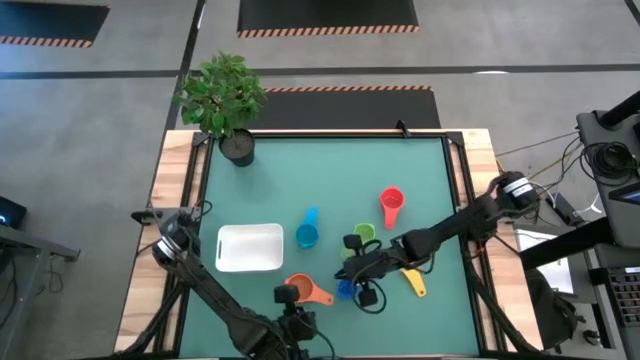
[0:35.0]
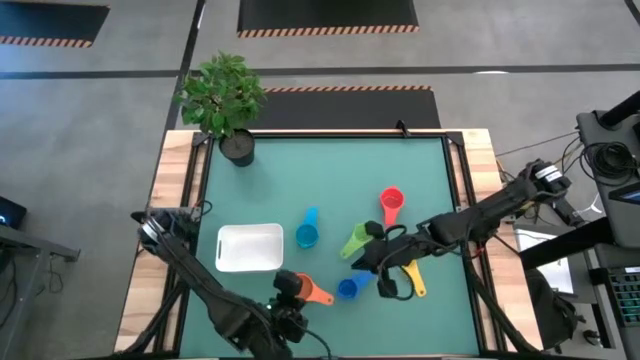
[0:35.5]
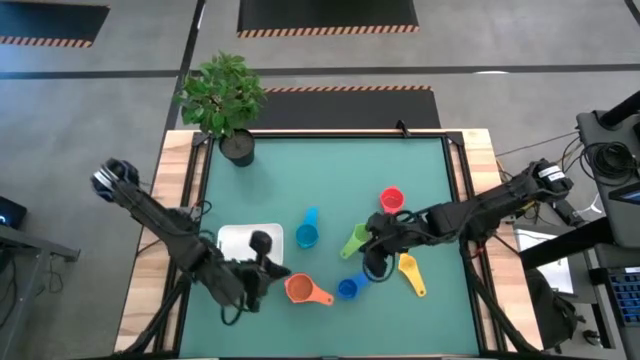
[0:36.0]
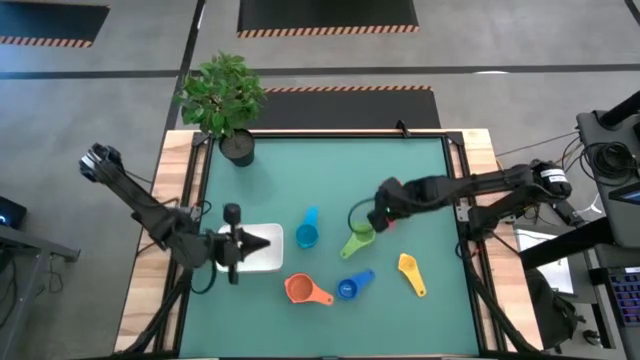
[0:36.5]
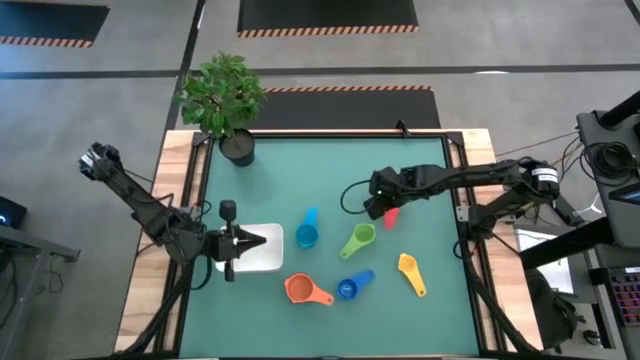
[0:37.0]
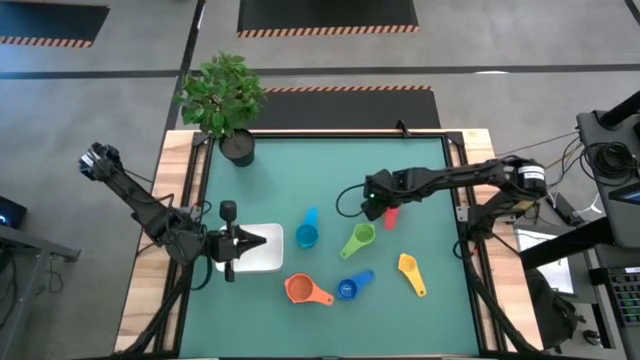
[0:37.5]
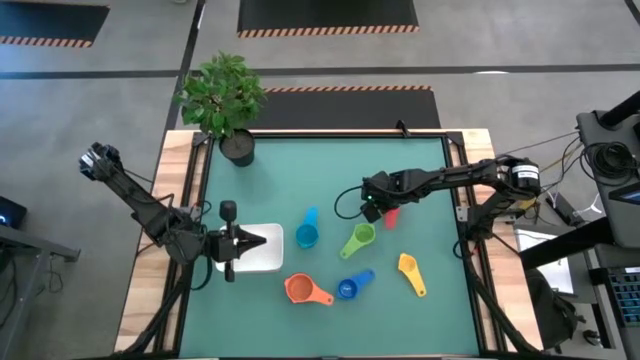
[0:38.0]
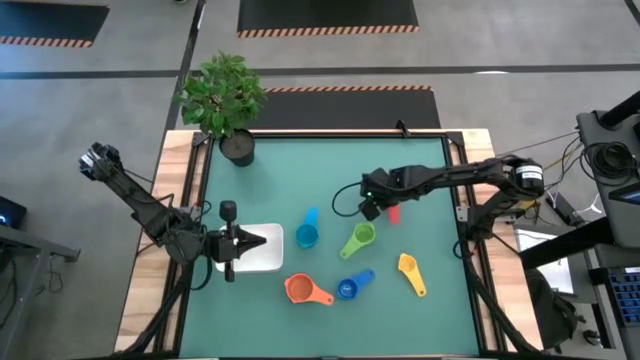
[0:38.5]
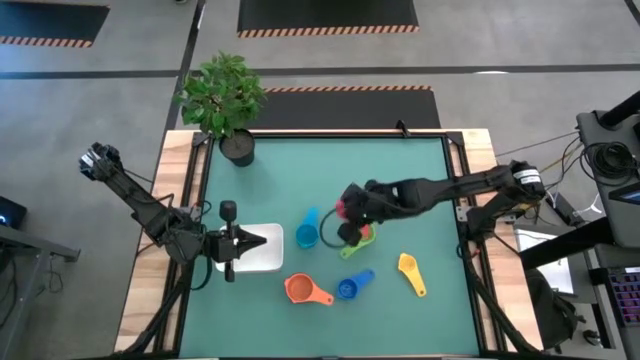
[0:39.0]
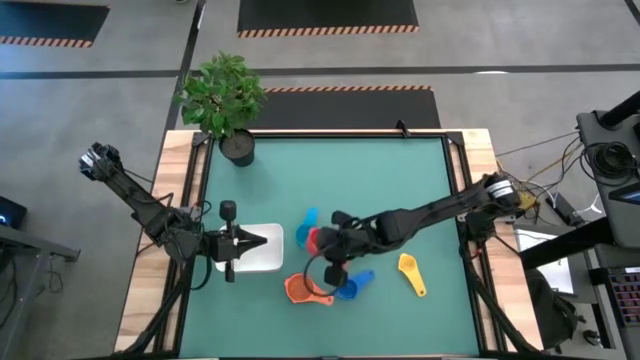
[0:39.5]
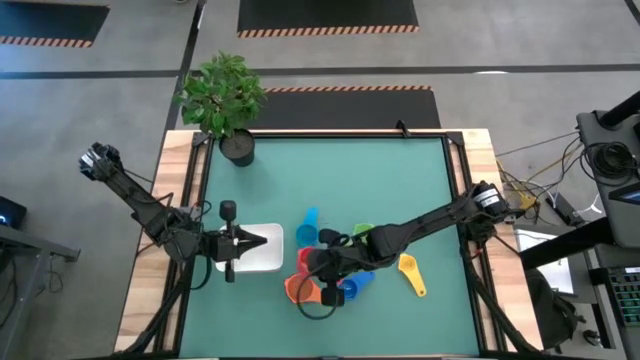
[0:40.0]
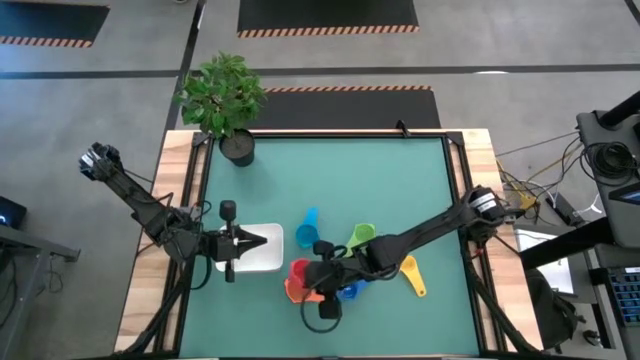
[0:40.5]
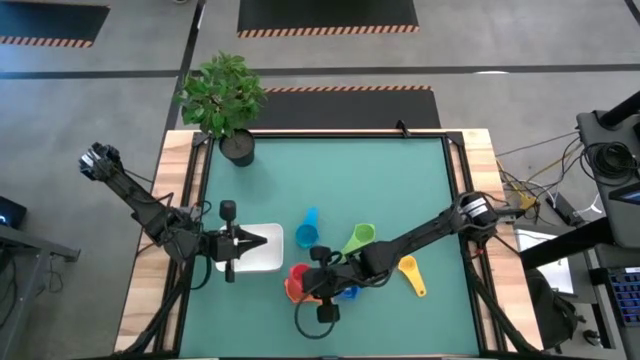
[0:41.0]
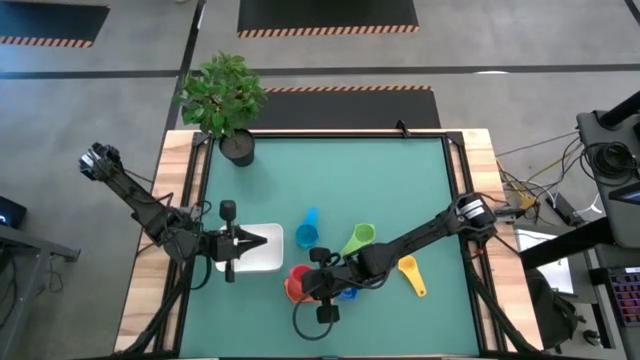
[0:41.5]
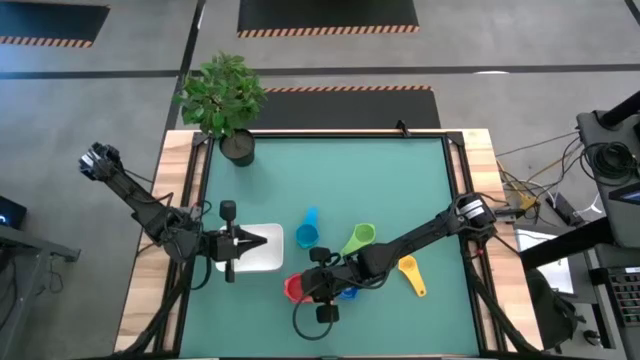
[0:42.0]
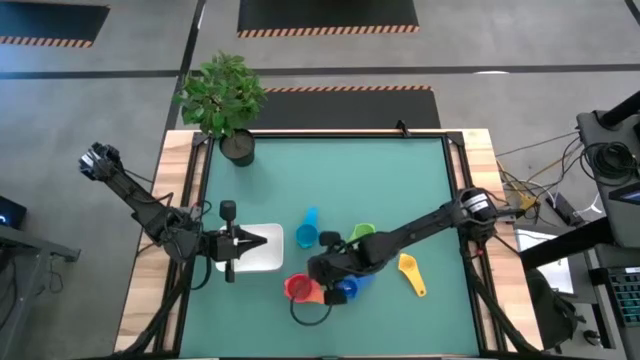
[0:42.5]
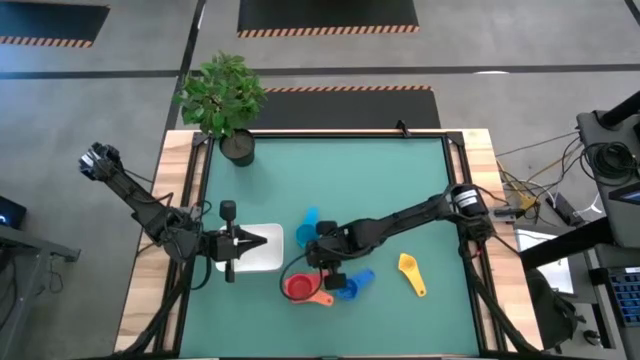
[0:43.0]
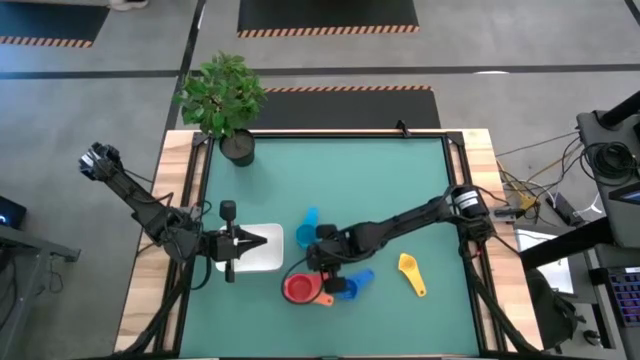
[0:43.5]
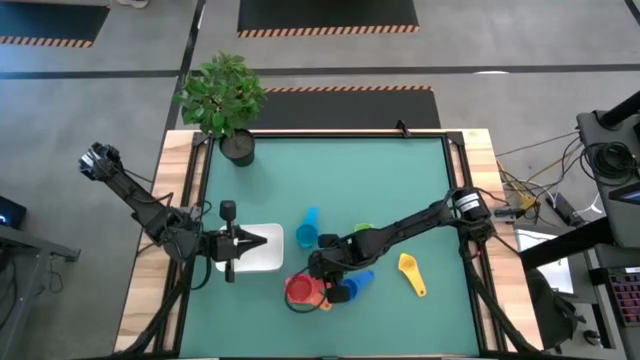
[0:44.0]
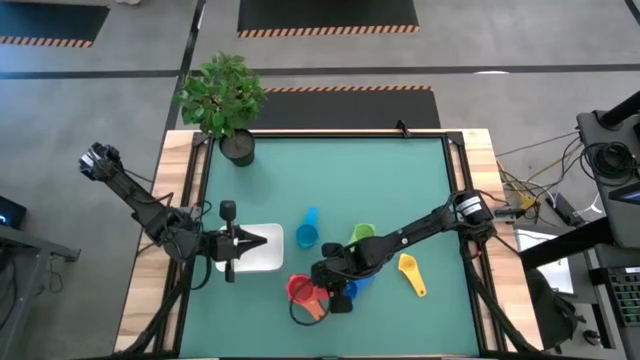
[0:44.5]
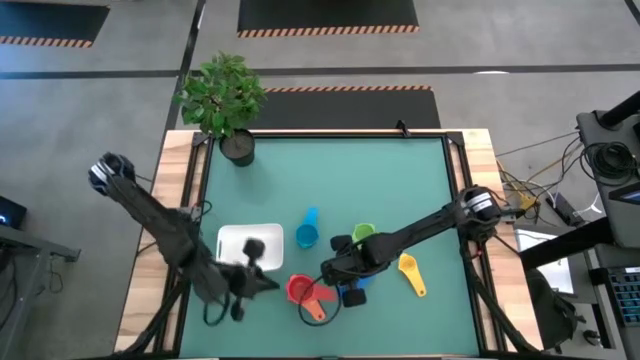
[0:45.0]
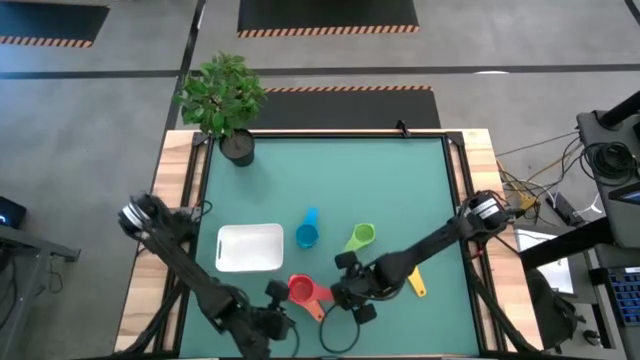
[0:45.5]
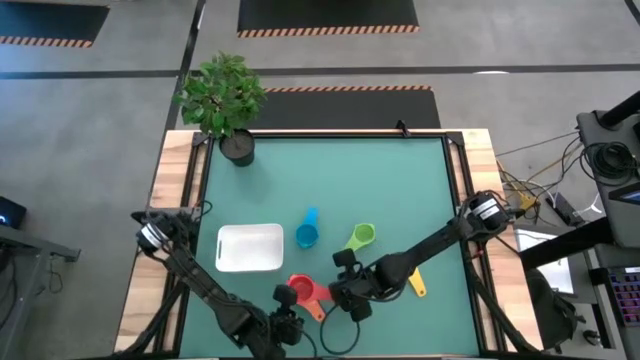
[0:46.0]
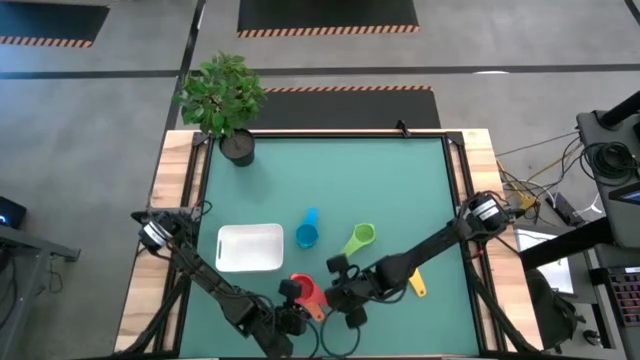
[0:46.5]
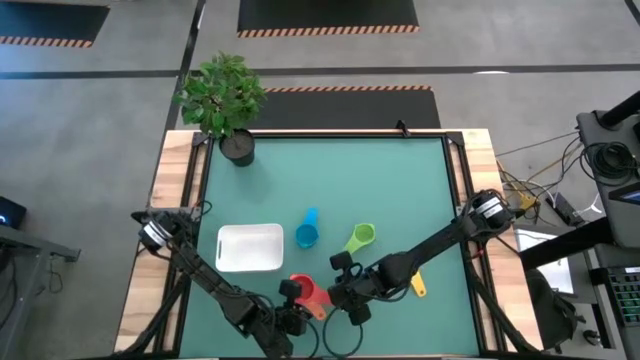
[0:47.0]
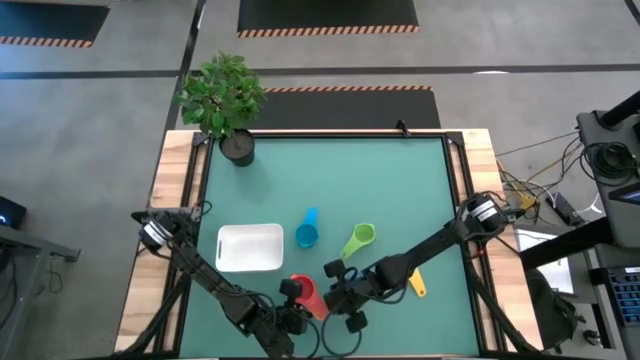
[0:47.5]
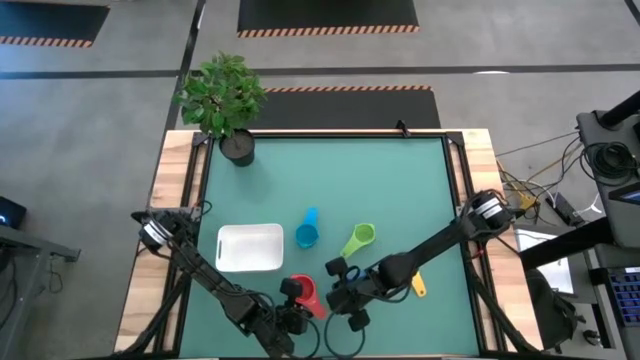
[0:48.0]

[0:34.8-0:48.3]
Task: Nest measuring cups in basket
Stack the red measuring cup in the top of the purple measuring cup

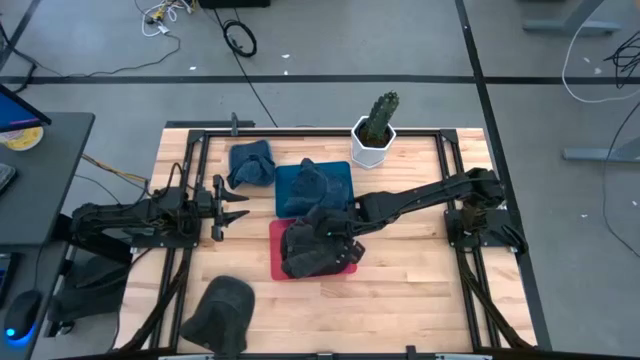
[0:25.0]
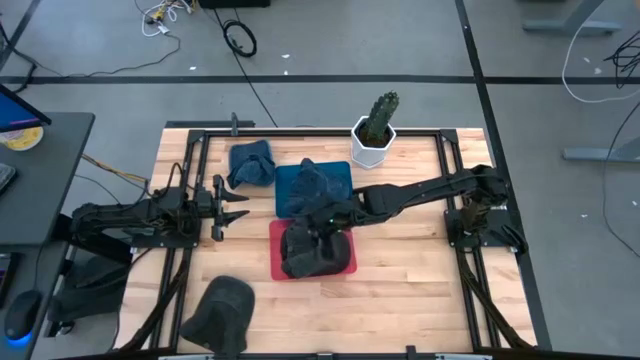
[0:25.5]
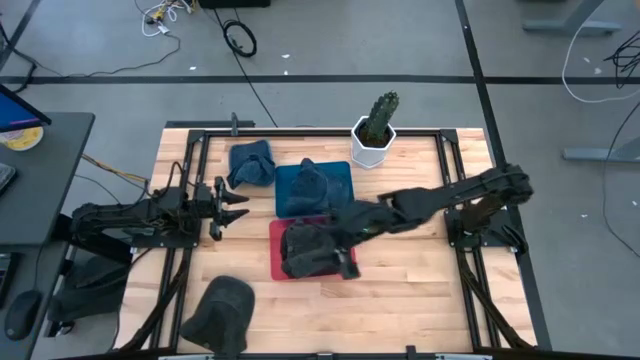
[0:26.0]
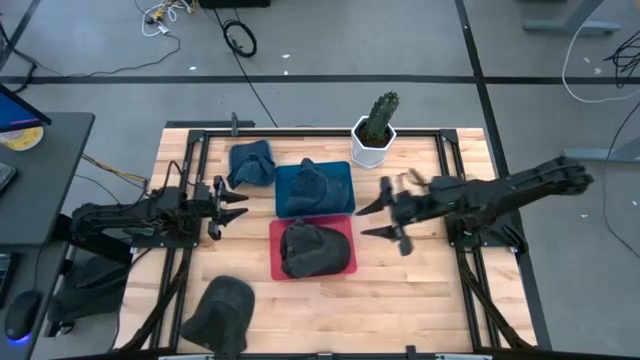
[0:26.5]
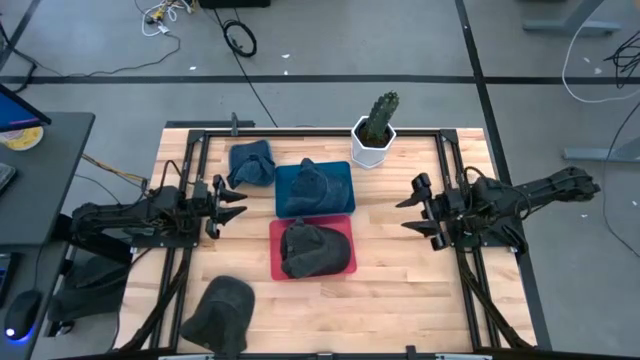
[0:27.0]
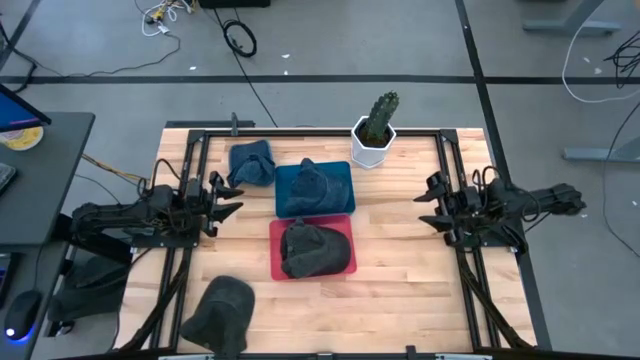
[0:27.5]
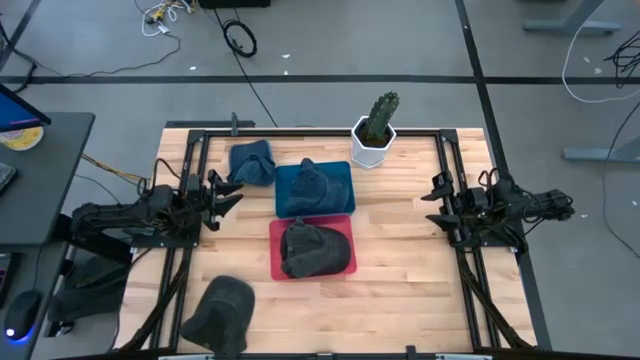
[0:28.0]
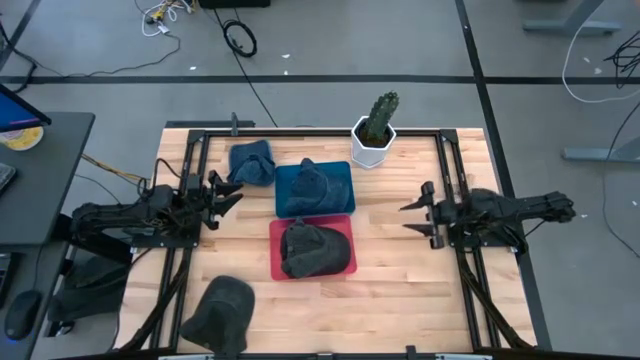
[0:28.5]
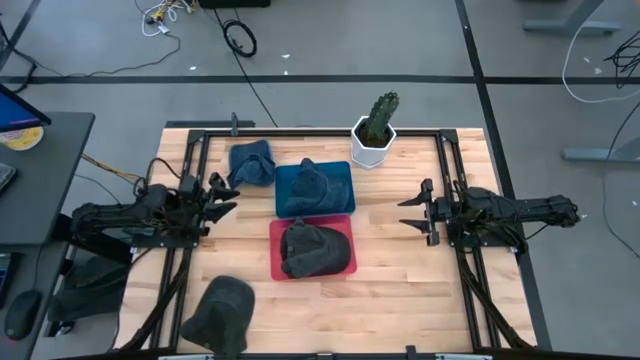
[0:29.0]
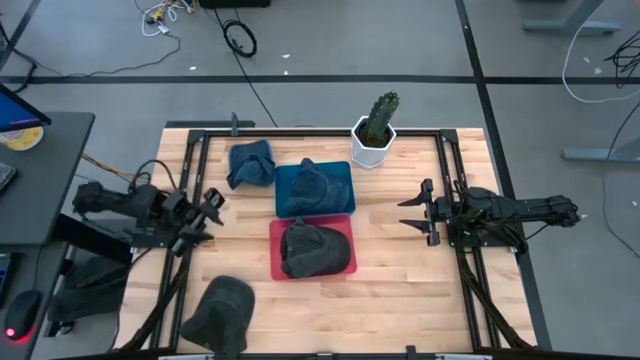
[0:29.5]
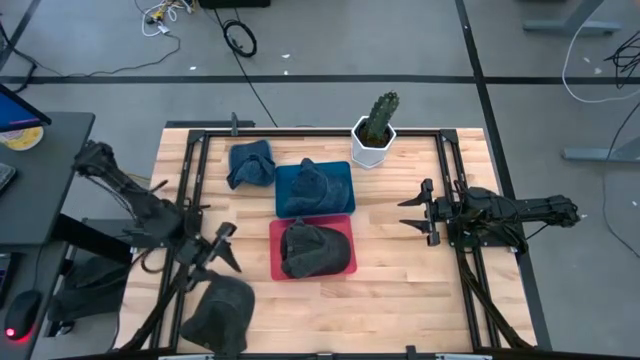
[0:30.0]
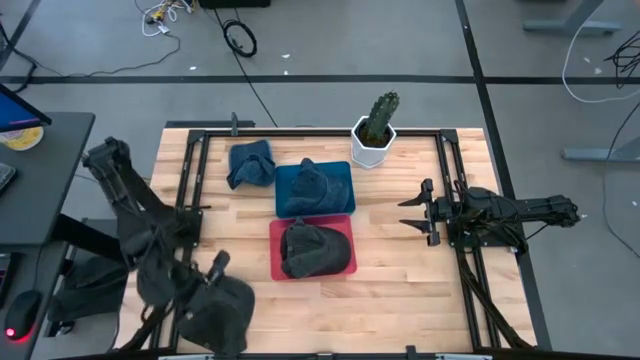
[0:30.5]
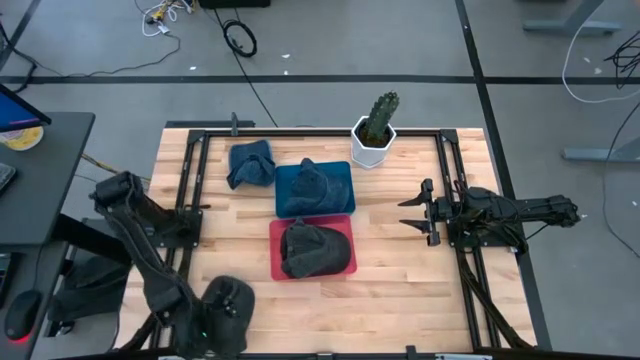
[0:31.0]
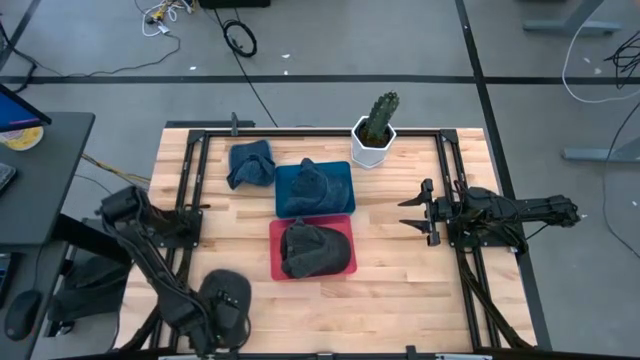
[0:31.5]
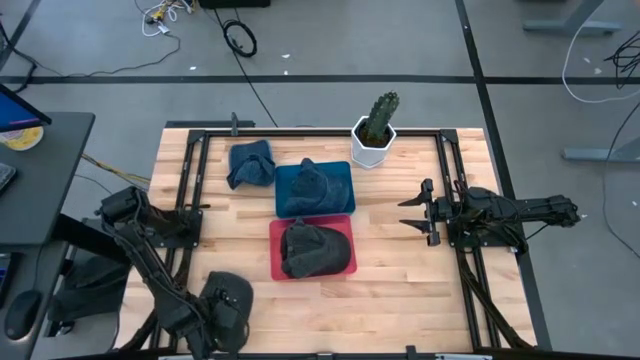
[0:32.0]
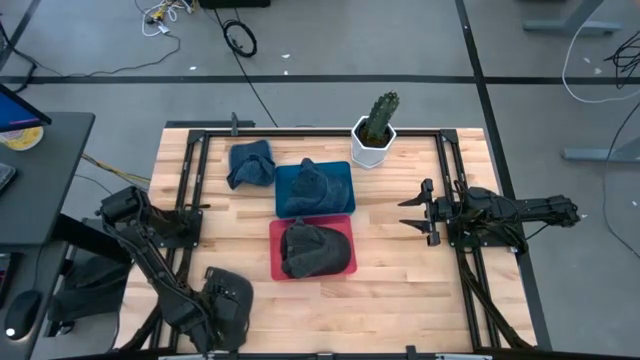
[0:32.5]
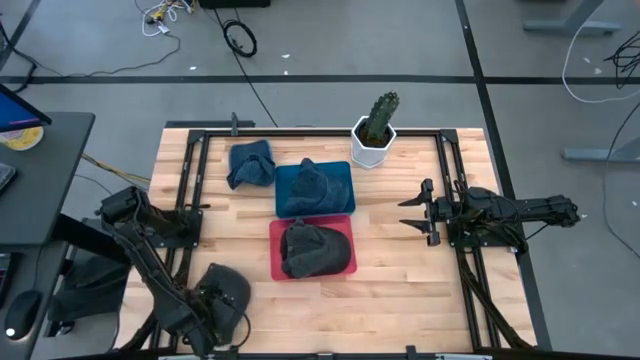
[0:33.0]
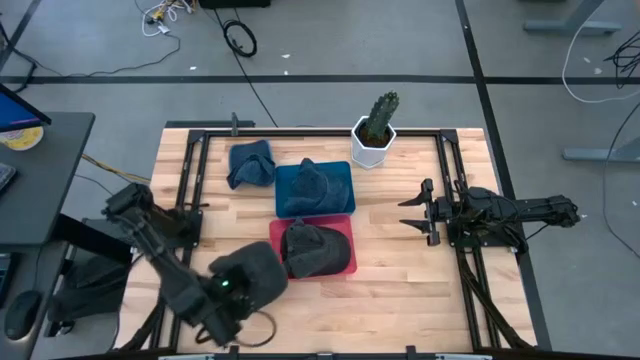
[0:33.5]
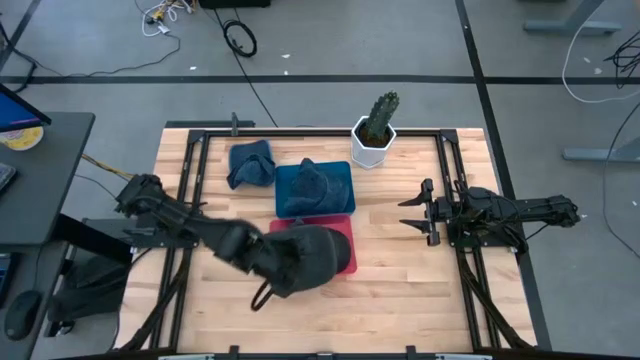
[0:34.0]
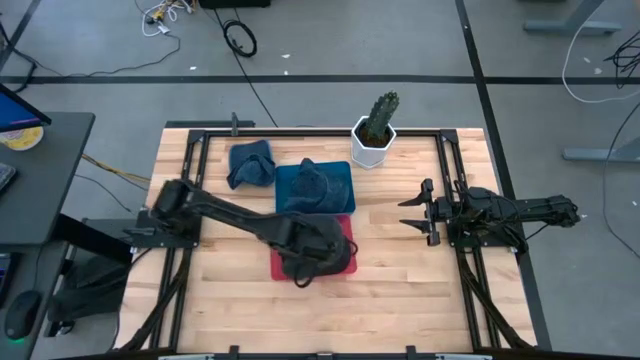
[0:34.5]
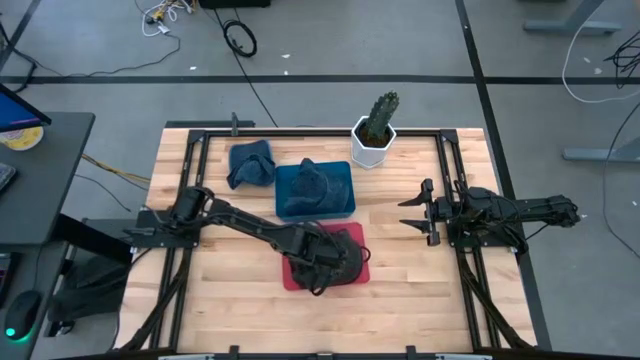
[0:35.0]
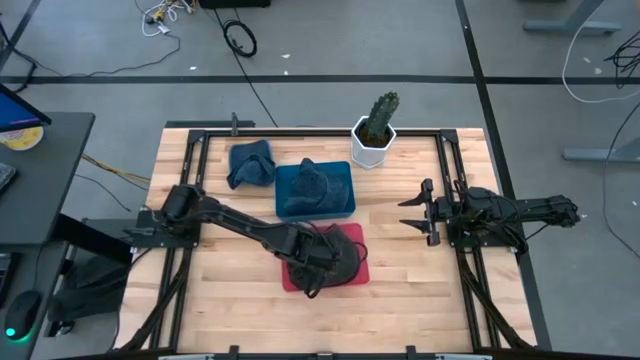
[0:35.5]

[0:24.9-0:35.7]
Task: Pick & Place hat
Put the black cap into the pink bin
